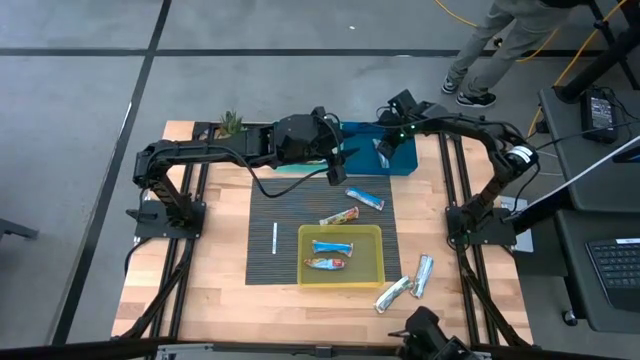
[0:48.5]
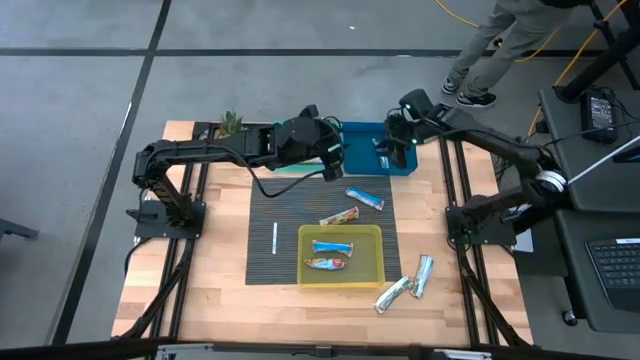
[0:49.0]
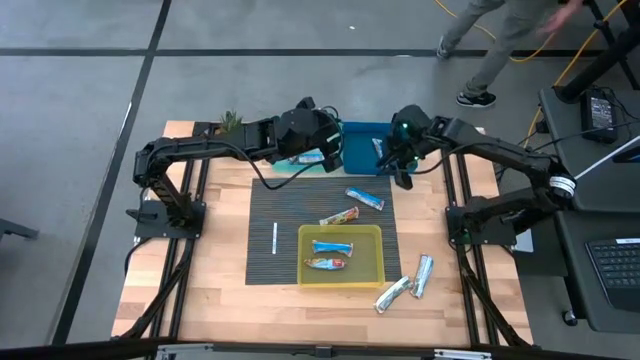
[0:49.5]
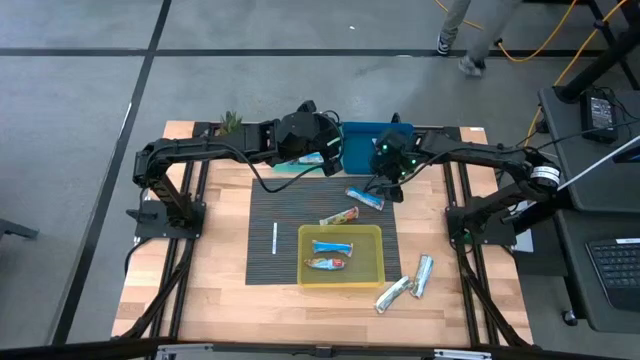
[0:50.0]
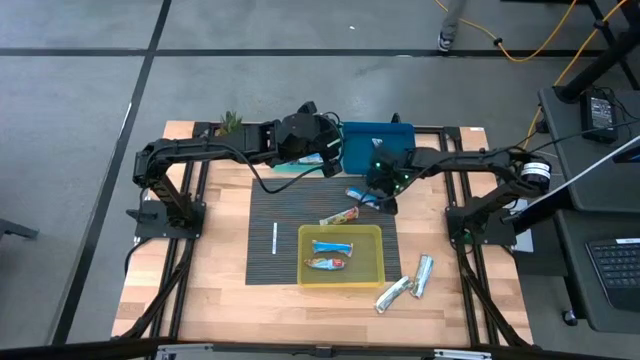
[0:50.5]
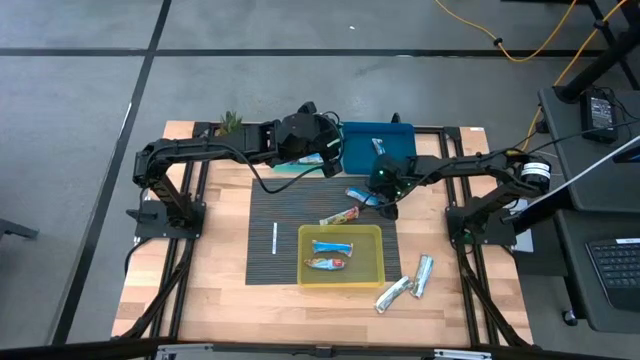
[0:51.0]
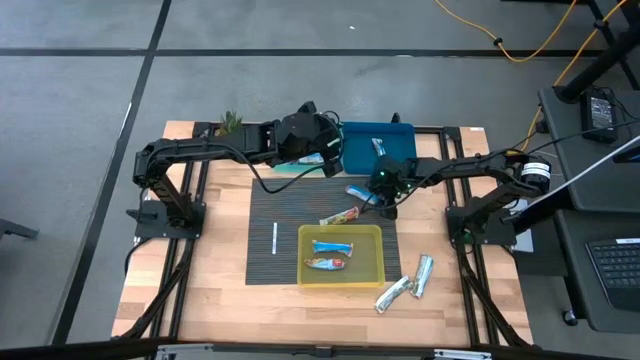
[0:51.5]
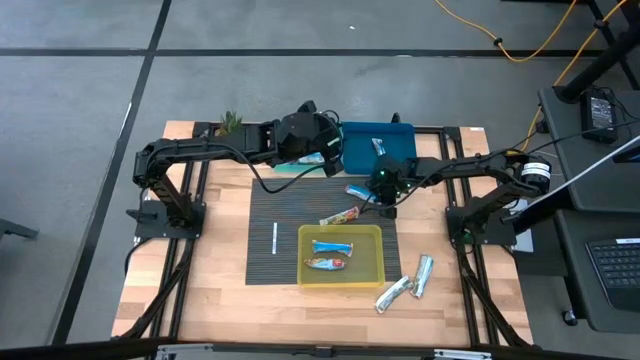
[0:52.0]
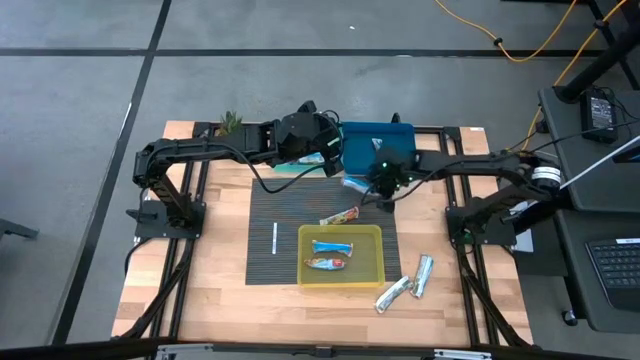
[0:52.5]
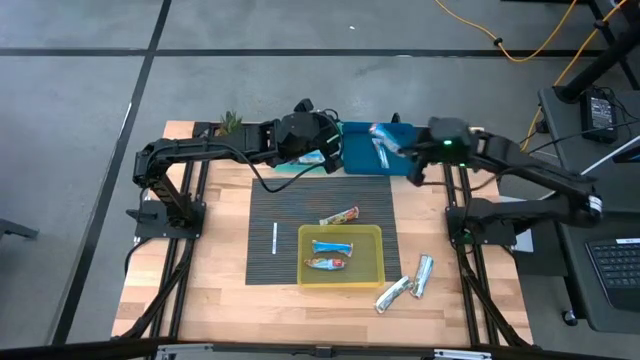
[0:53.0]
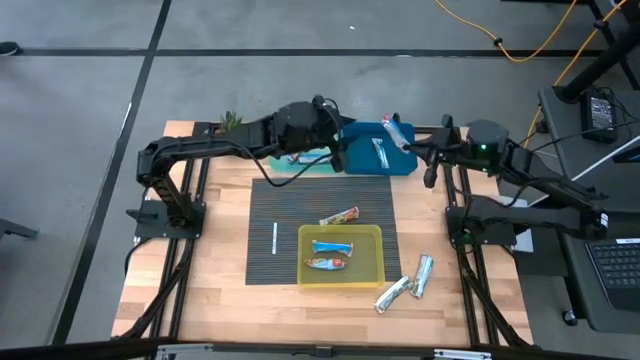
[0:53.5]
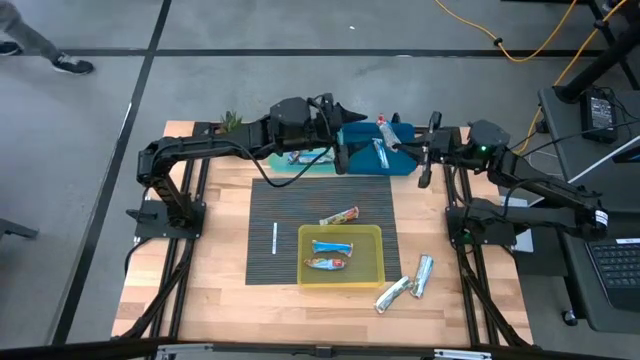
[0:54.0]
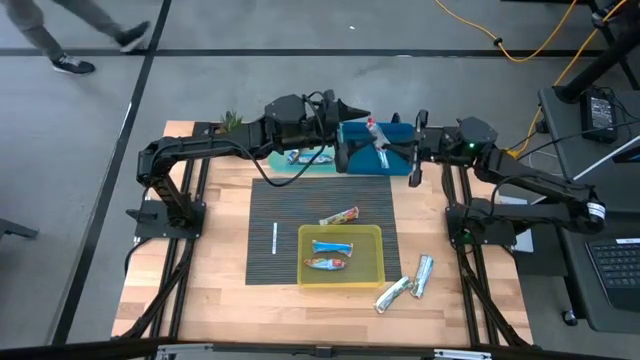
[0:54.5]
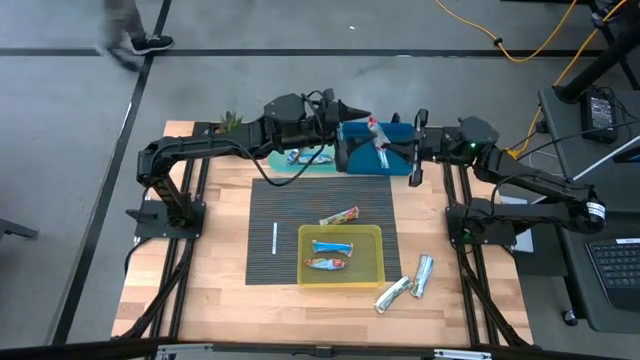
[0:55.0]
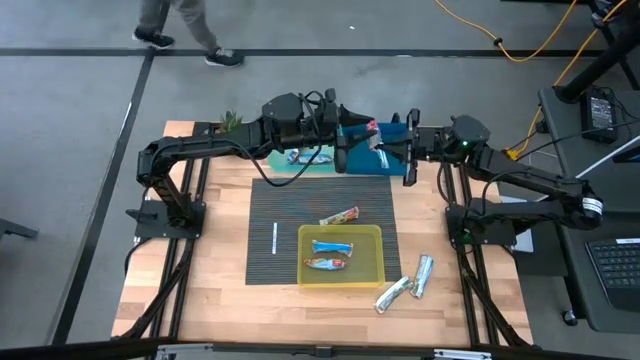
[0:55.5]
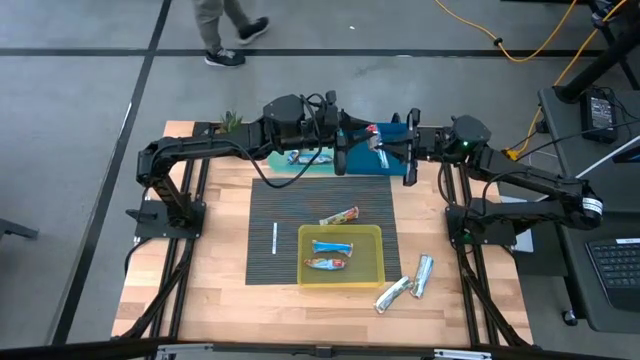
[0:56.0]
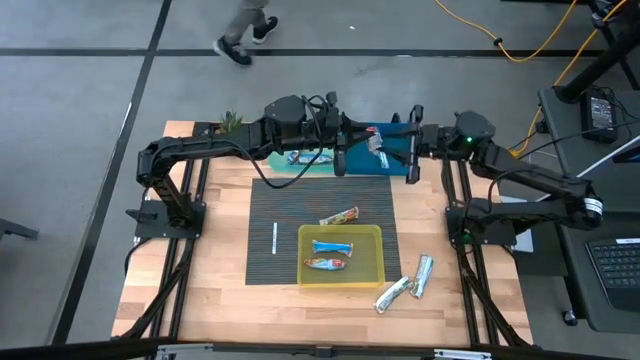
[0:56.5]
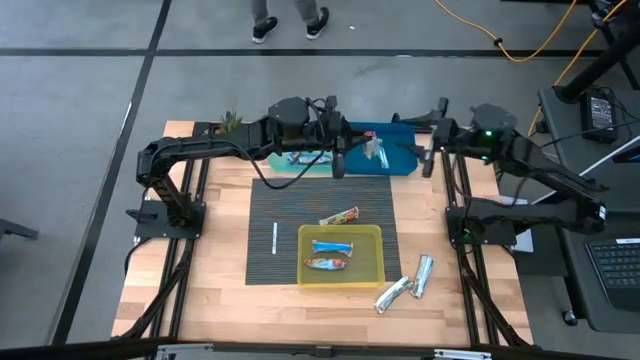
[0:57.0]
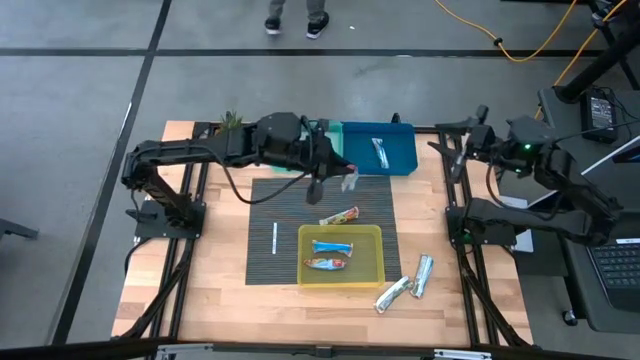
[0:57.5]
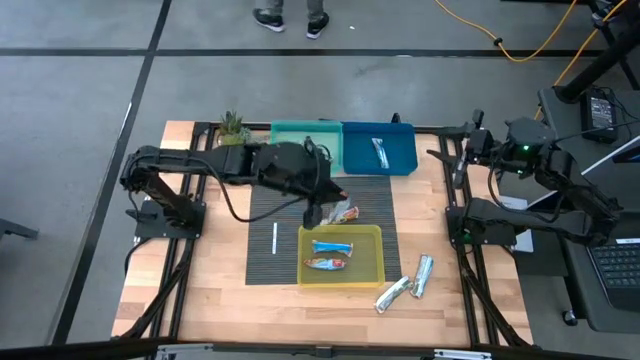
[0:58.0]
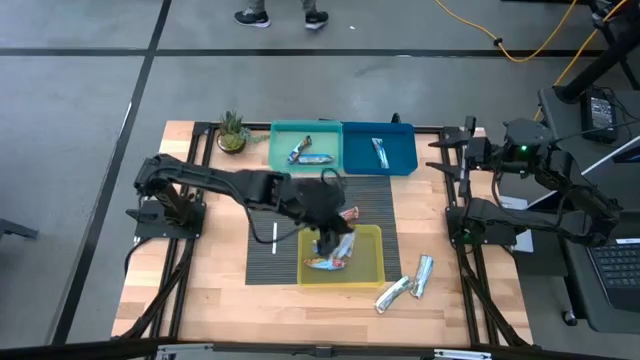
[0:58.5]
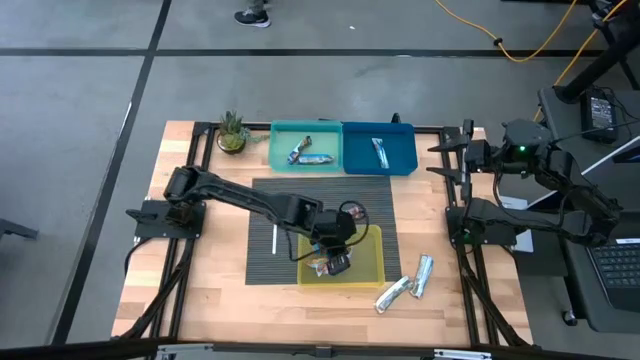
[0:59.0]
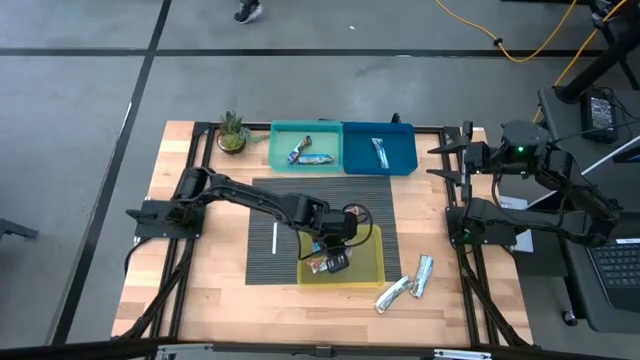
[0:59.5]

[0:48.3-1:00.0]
Task: Pick and place Granola Bars by type
Put the red granola bar into the yellow bin

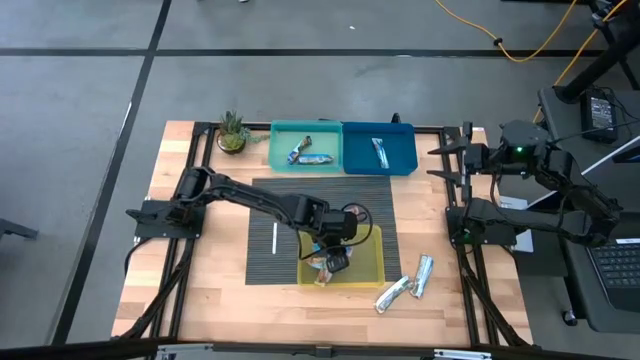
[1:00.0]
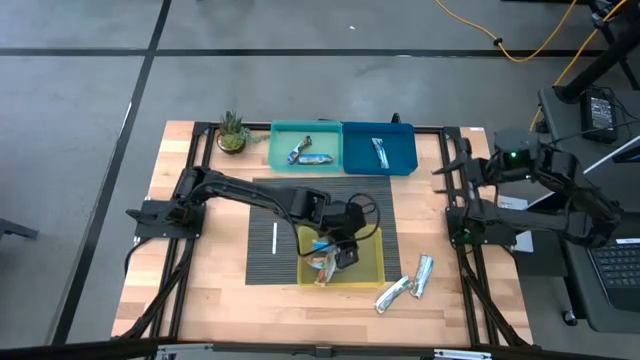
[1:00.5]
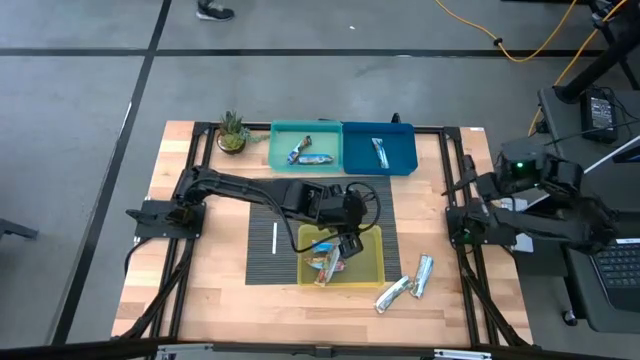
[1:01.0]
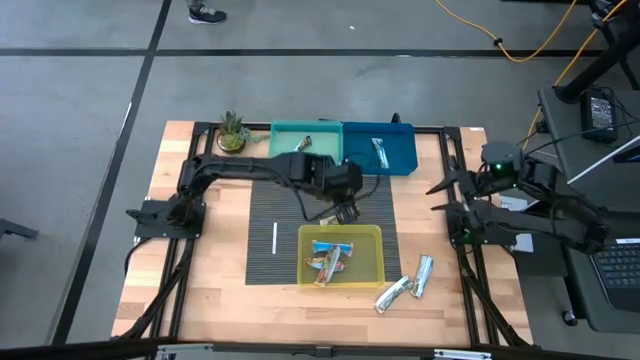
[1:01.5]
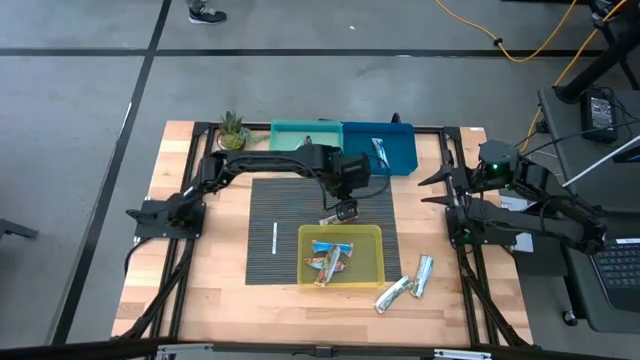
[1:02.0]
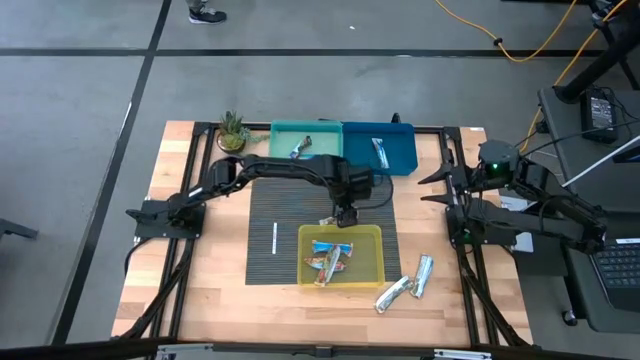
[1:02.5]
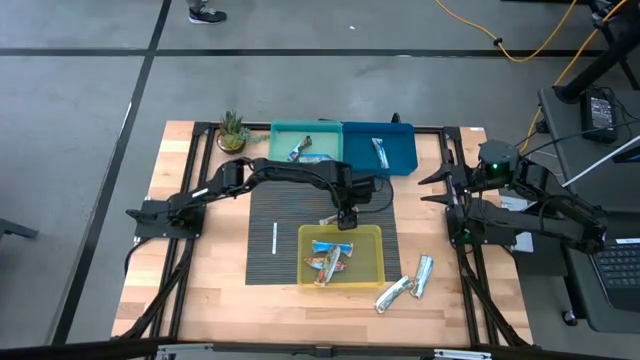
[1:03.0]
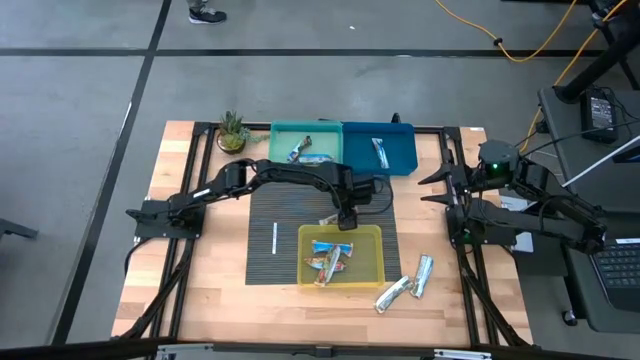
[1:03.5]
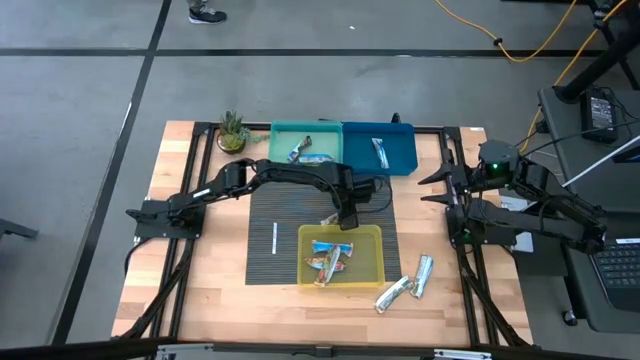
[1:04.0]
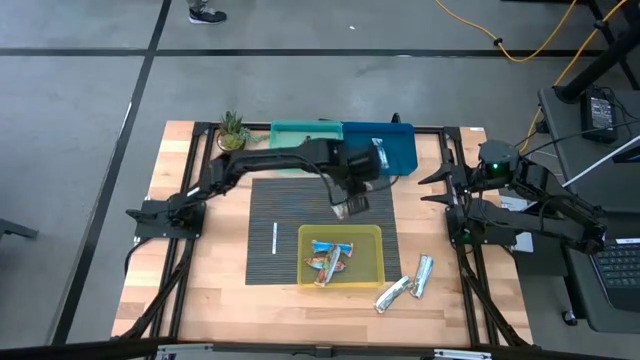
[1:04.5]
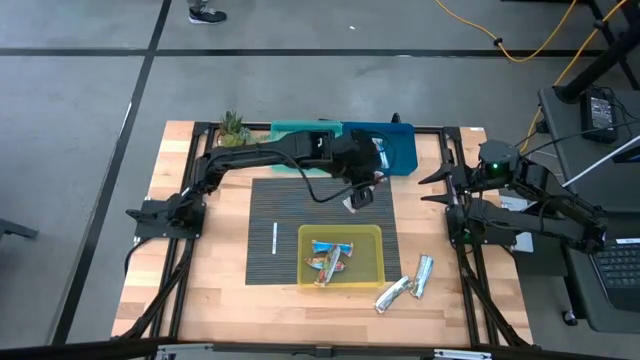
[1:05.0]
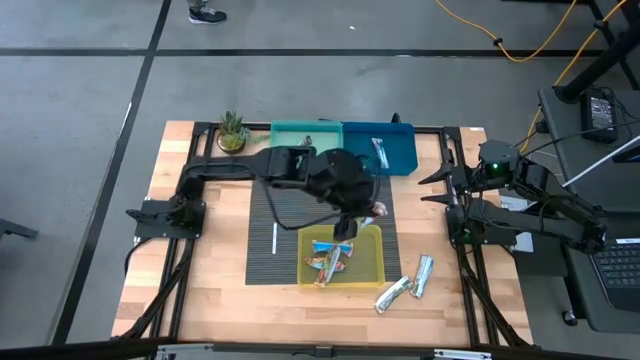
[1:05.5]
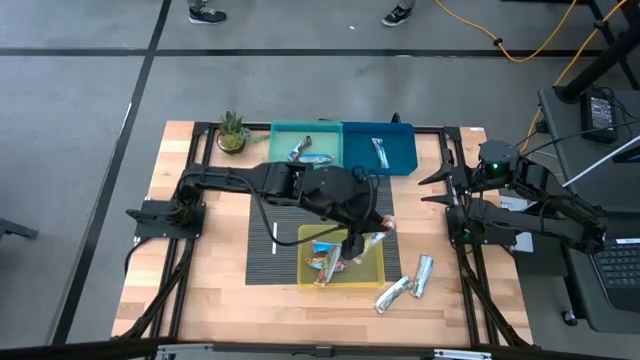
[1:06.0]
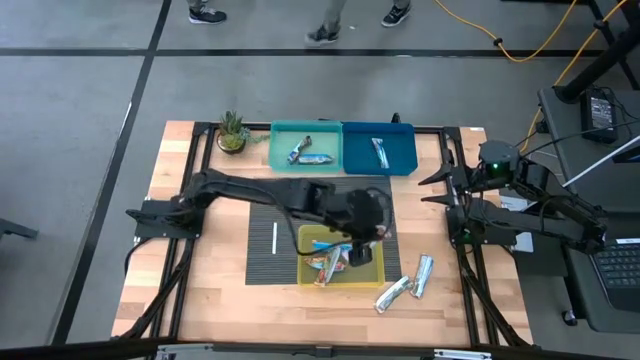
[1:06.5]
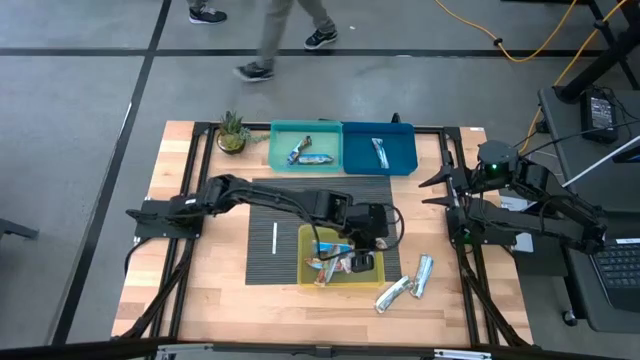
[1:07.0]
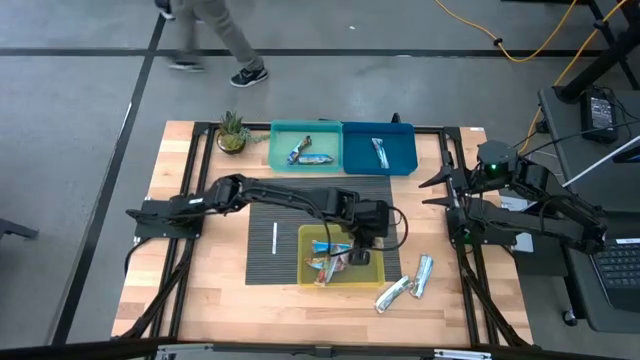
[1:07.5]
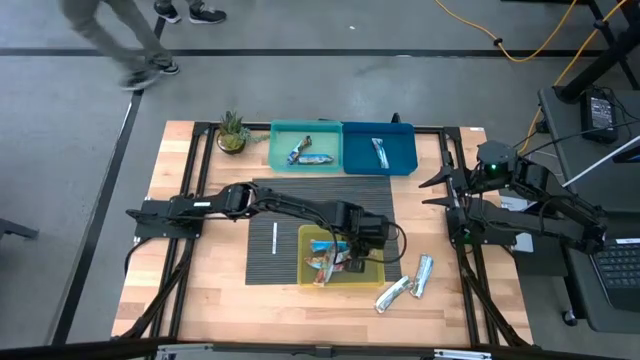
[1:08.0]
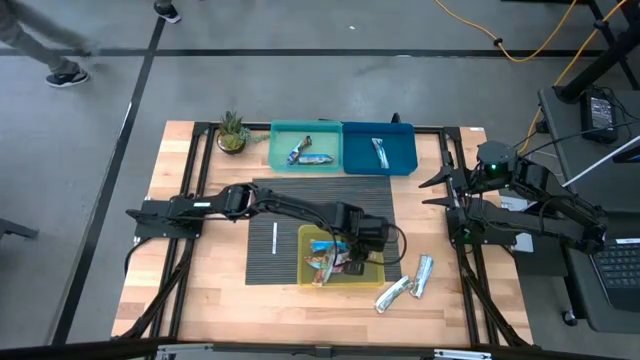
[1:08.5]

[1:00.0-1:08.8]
Put the red granola bar into the yellow bin
